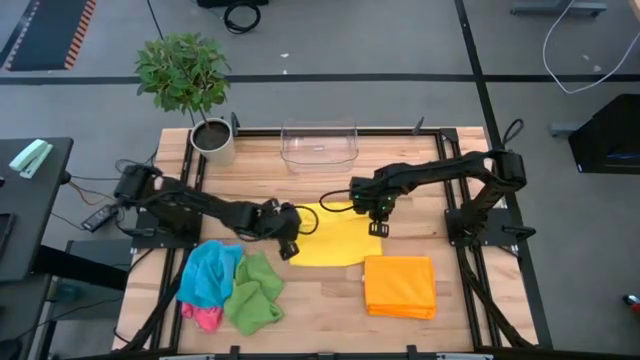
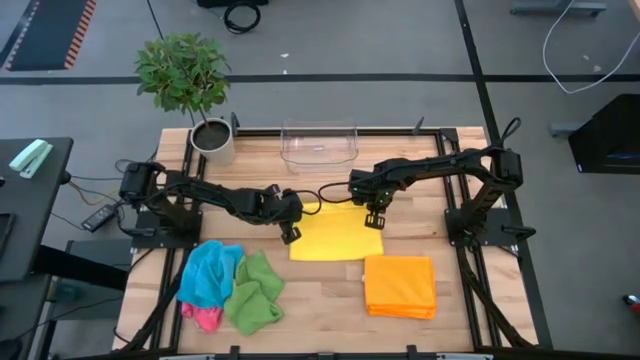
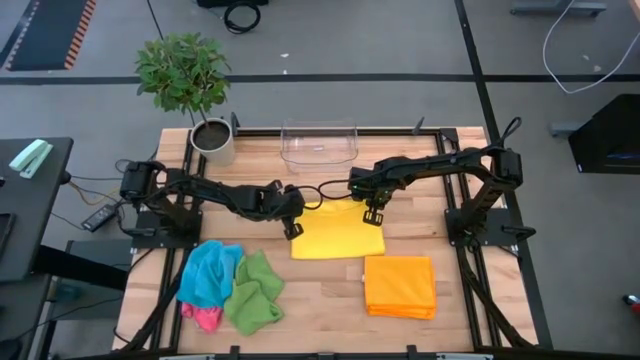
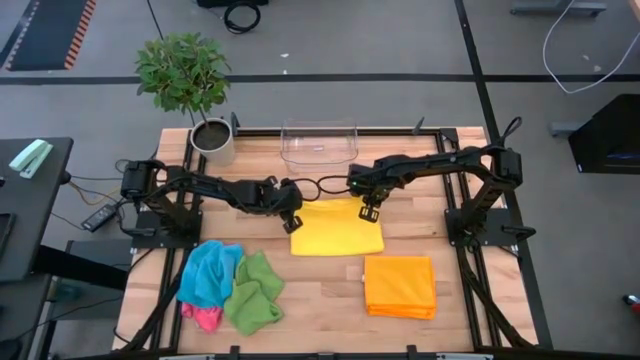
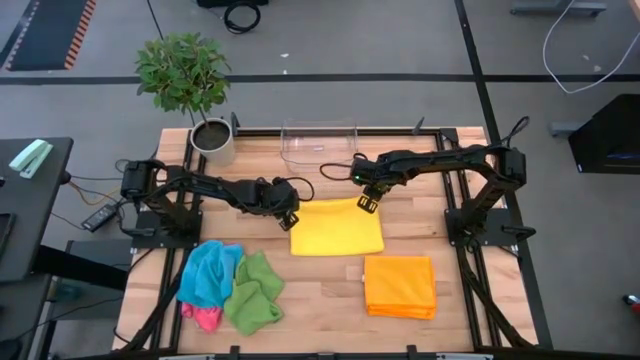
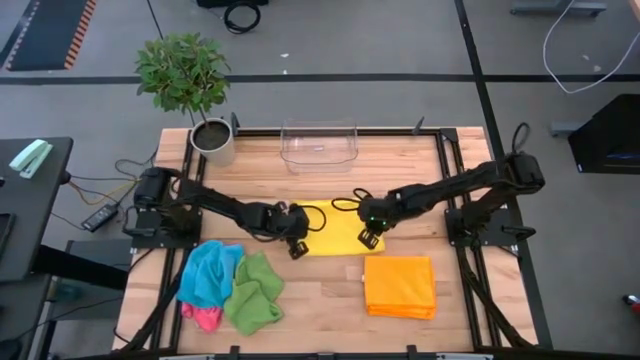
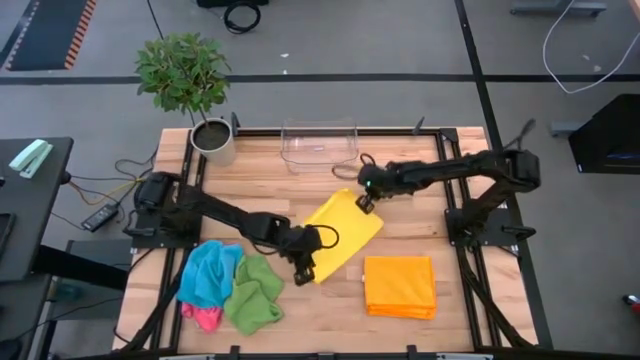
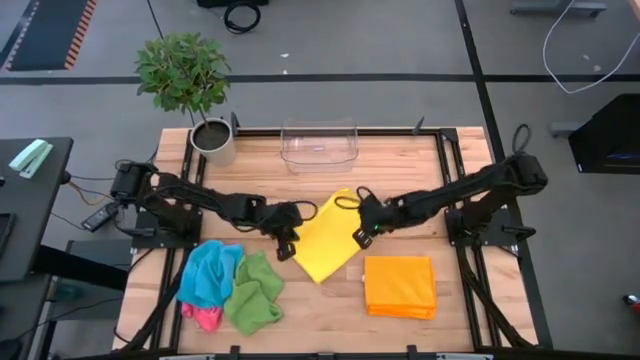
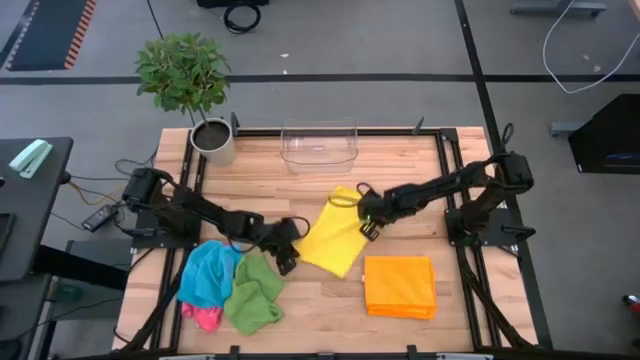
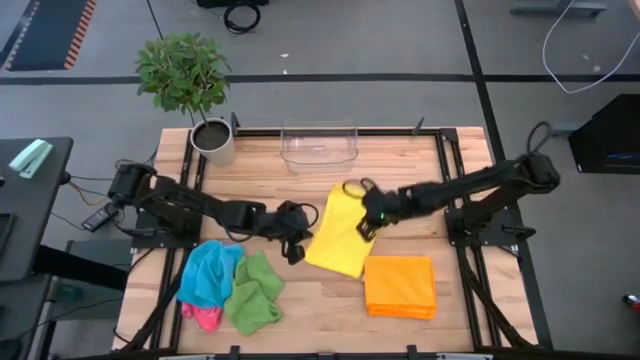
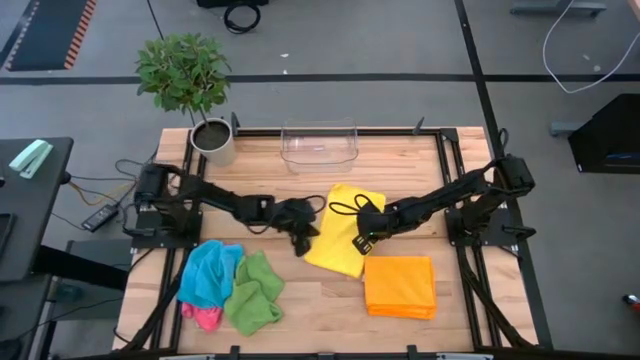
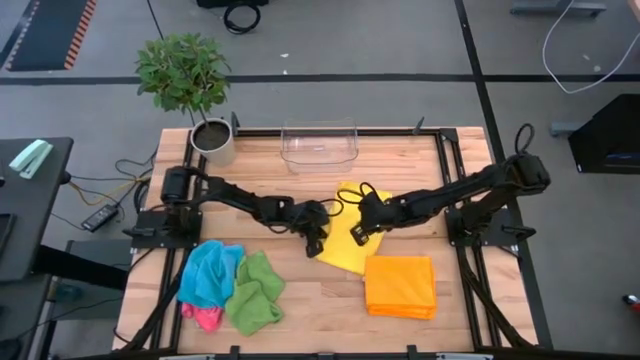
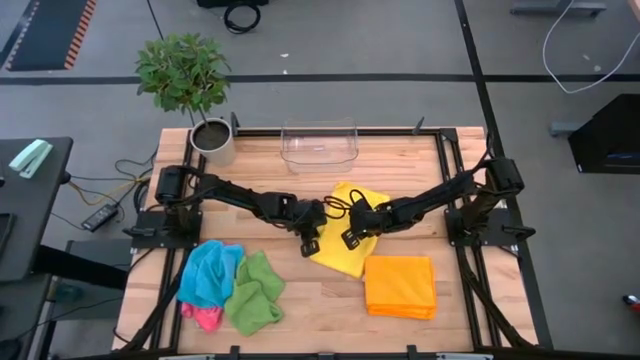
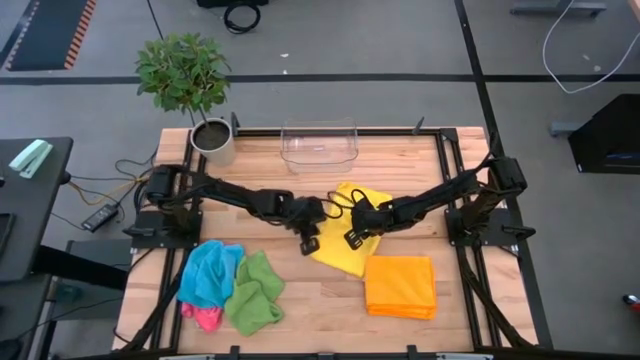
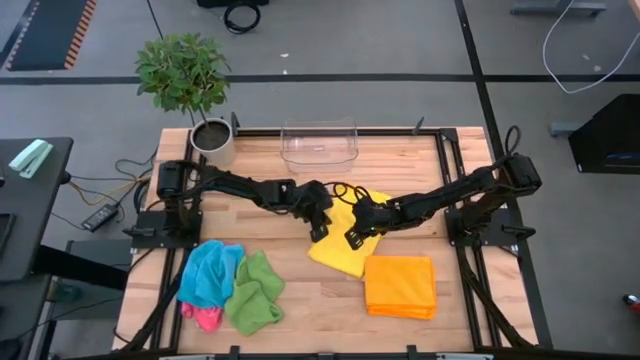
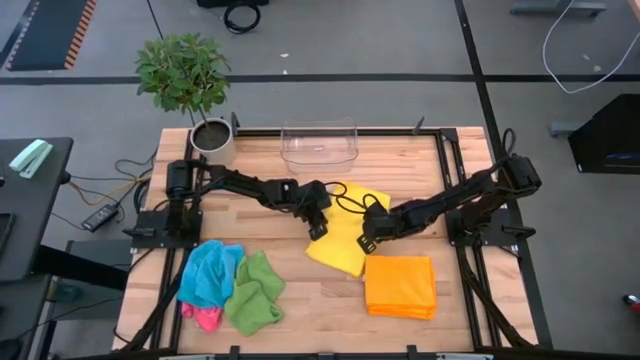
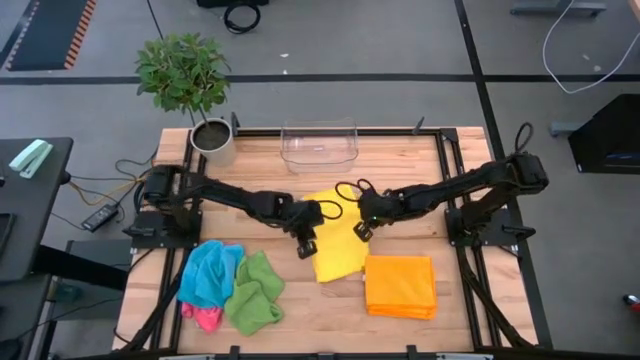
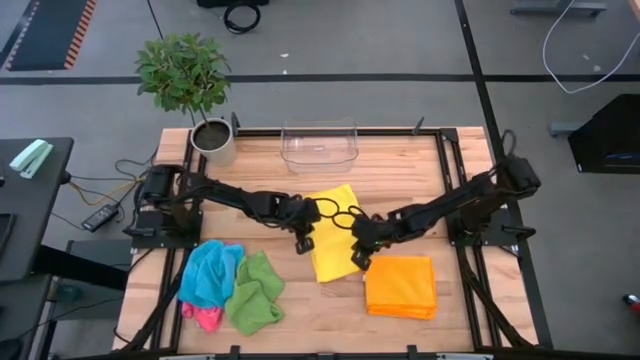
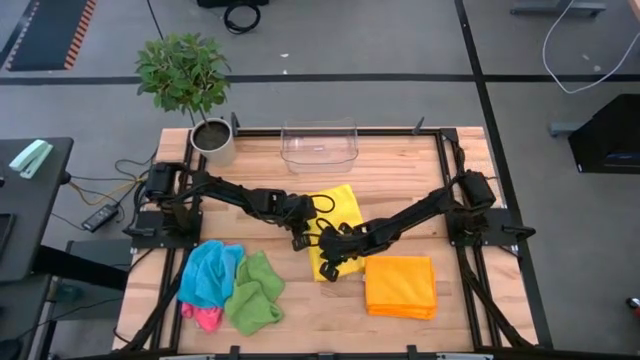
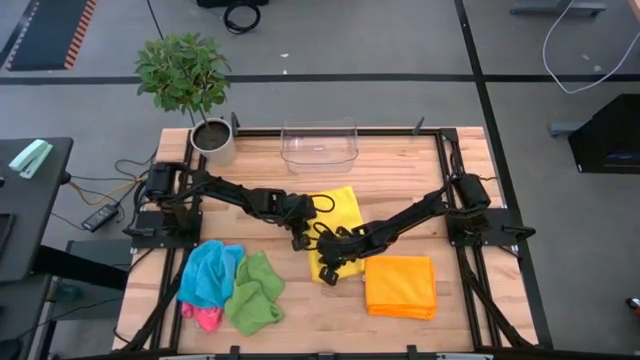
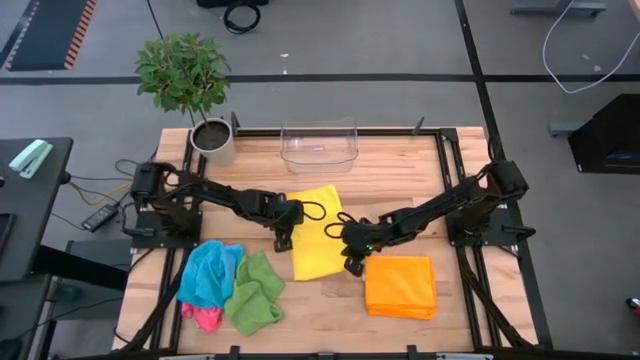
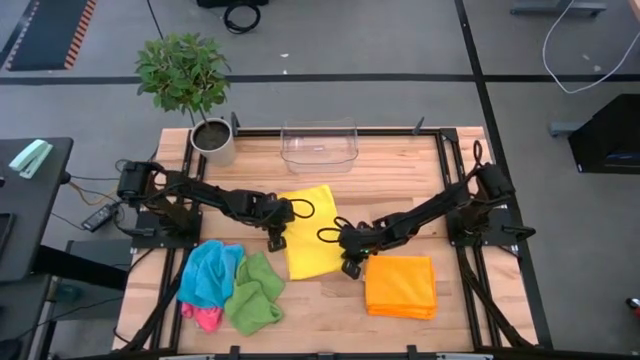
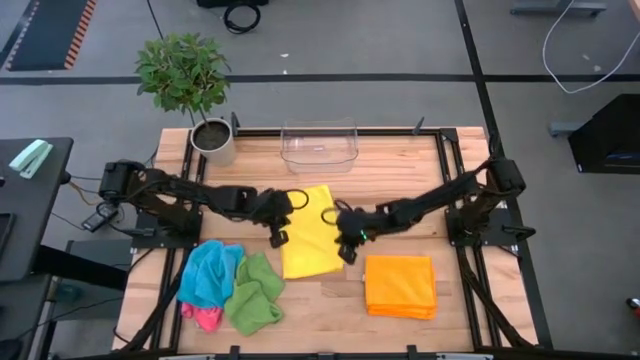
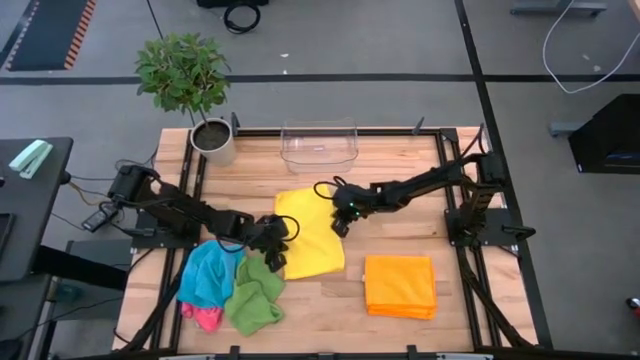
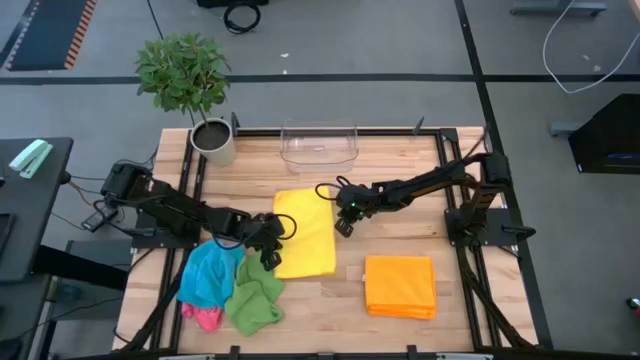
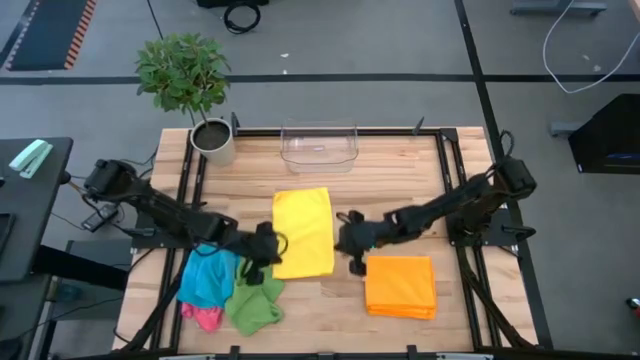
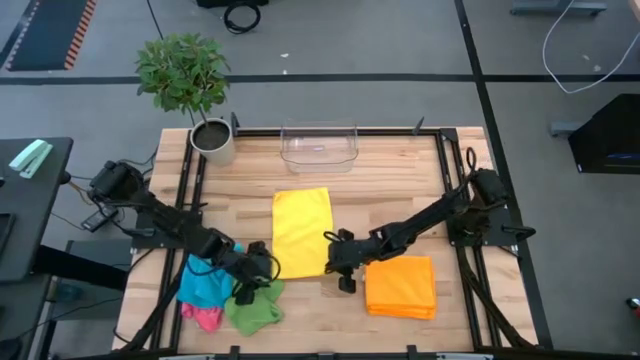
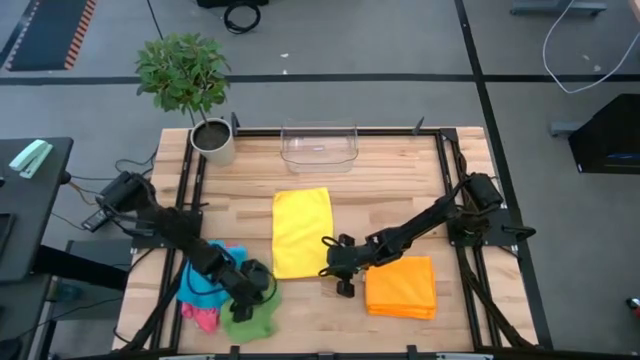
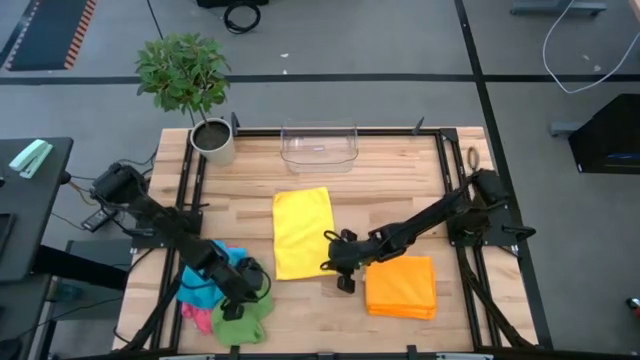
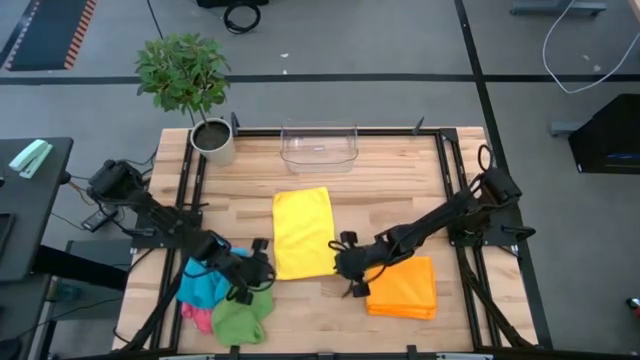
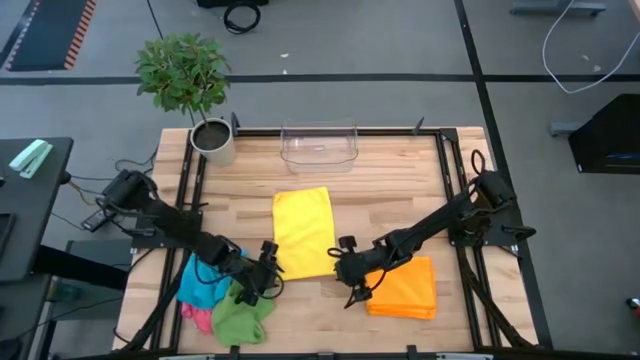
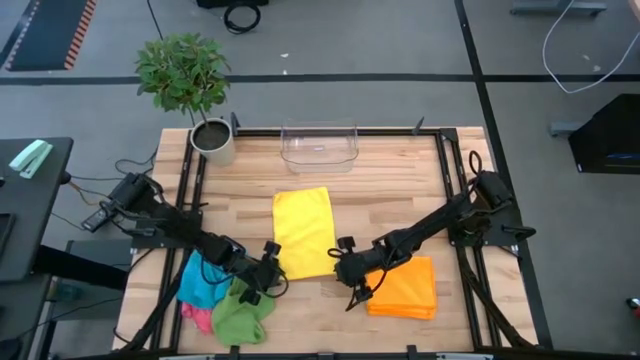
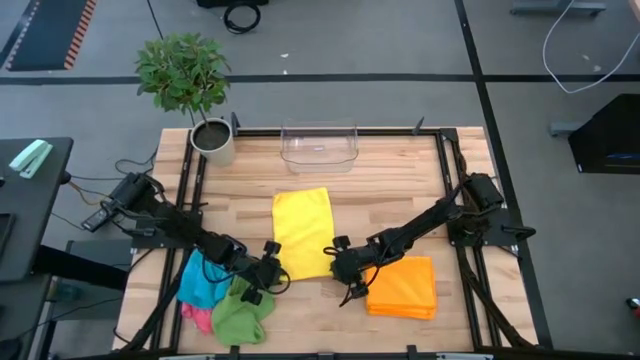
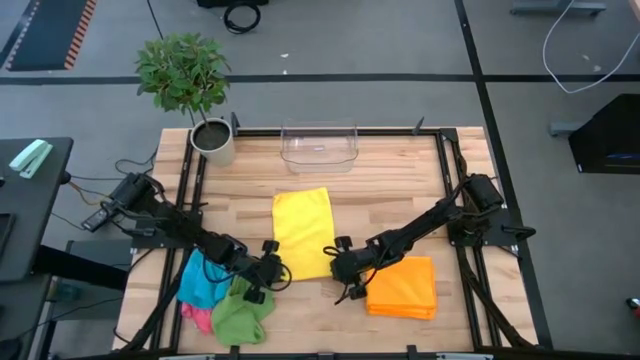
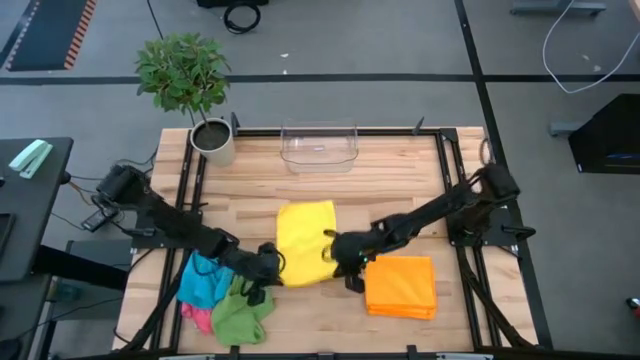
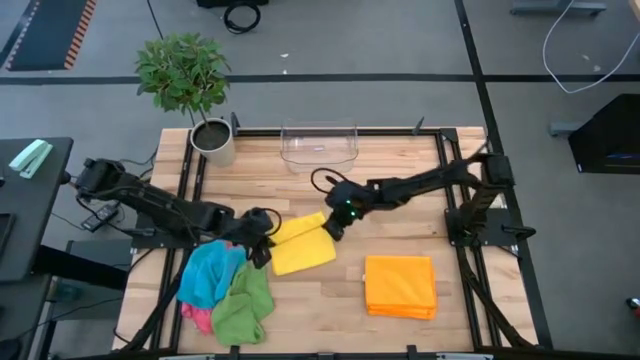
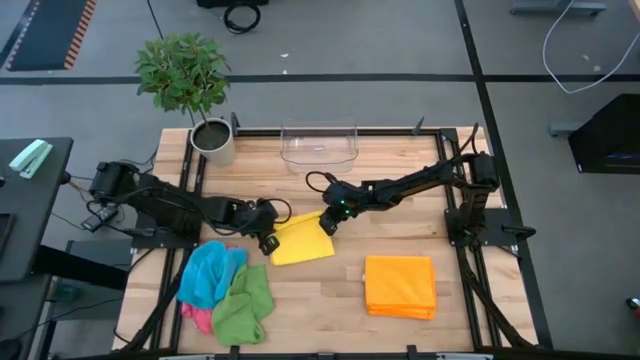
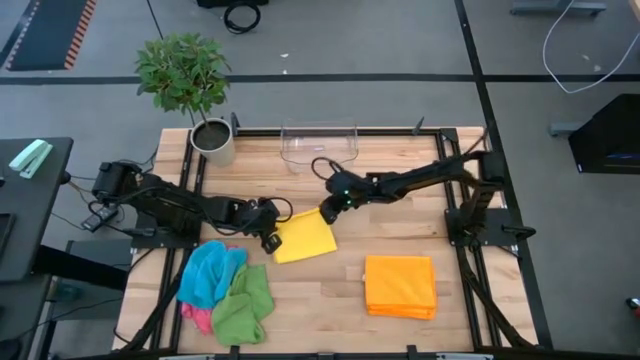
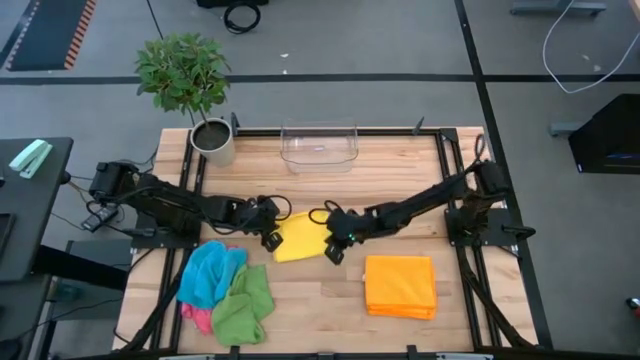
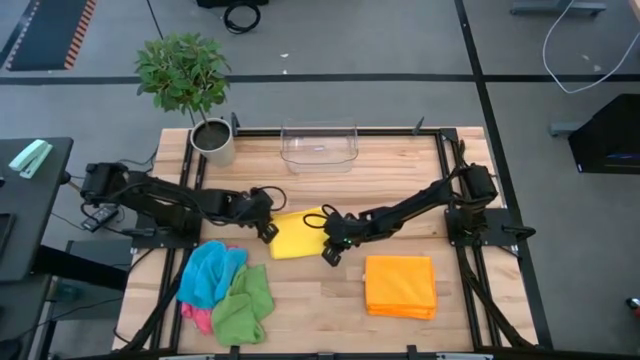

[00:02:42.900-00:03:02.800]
Task: Fold microfiber towels
Fold the yellow towel on the table
